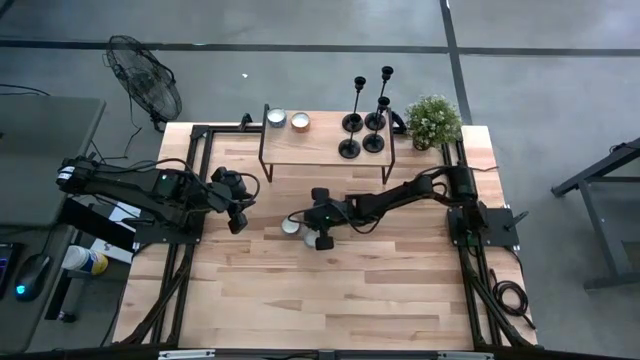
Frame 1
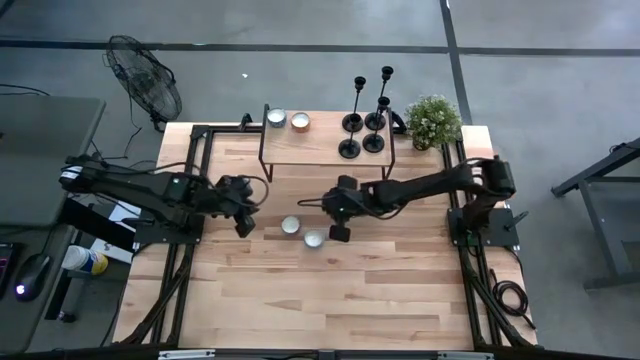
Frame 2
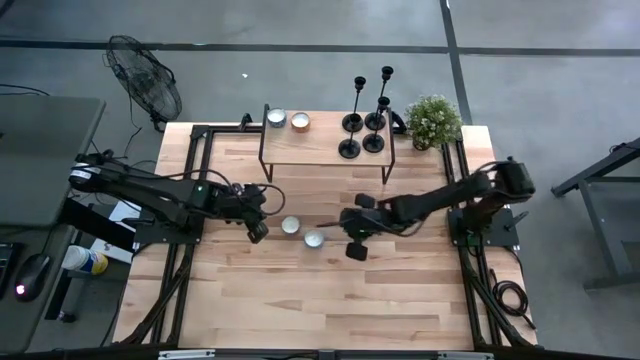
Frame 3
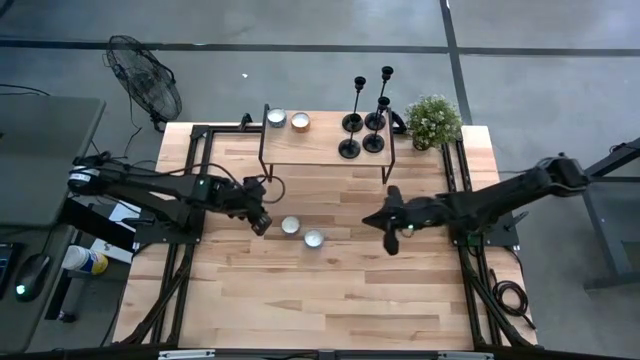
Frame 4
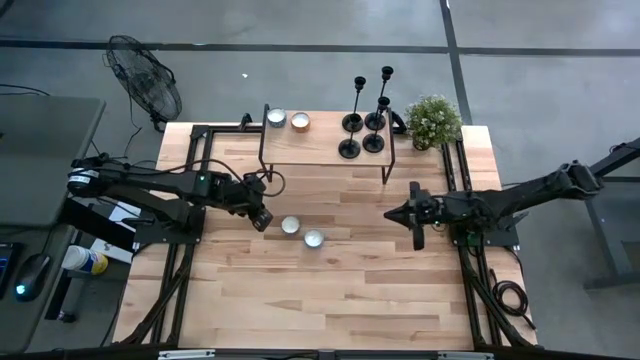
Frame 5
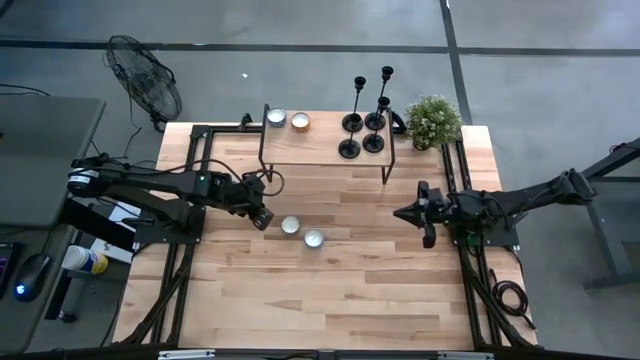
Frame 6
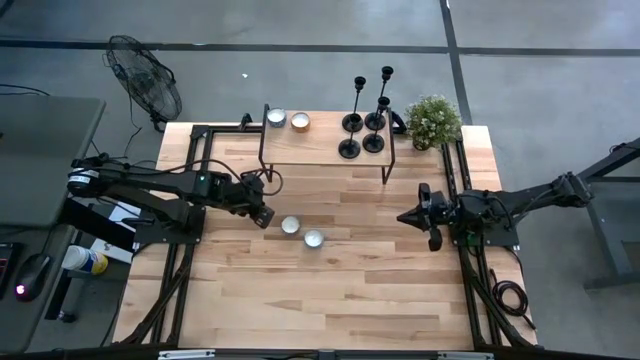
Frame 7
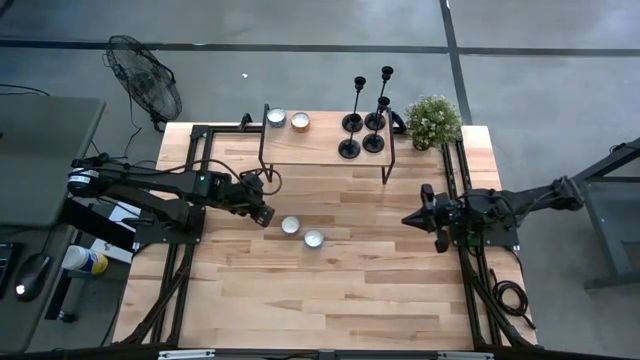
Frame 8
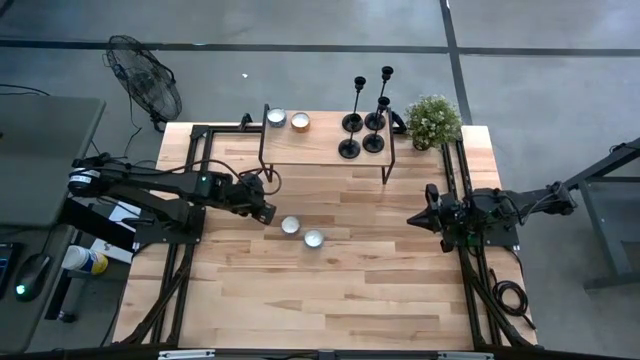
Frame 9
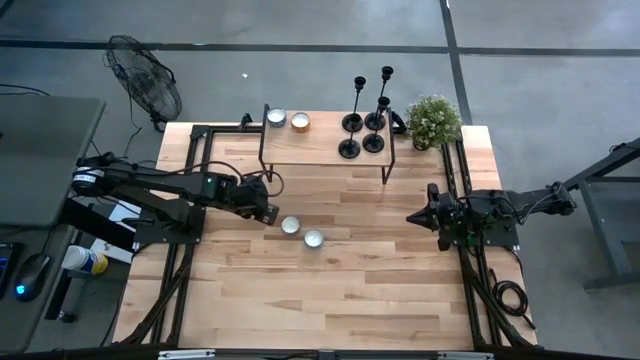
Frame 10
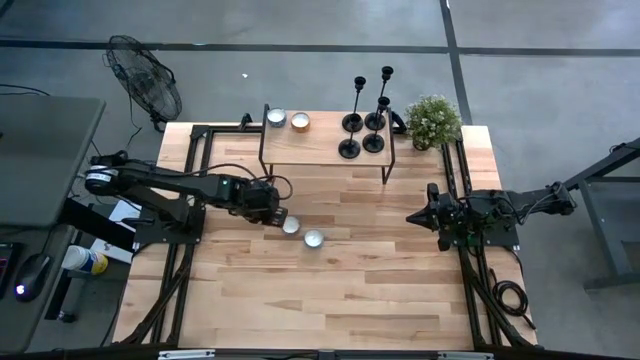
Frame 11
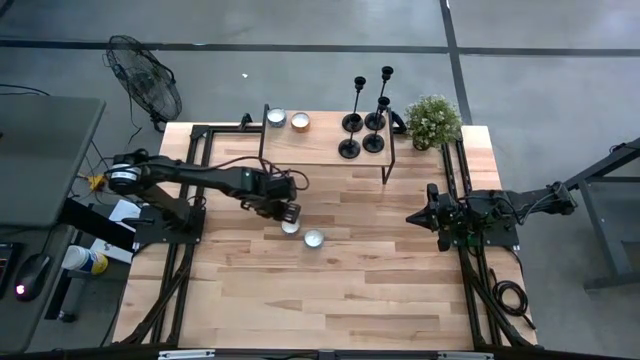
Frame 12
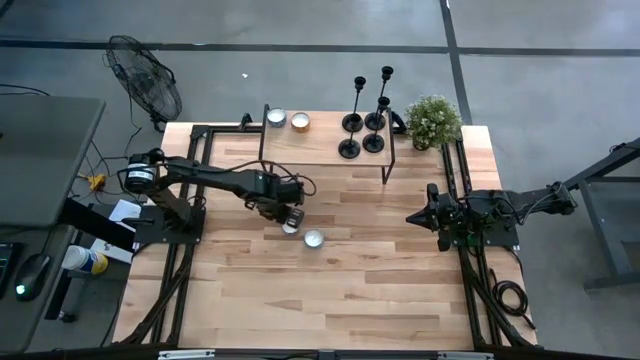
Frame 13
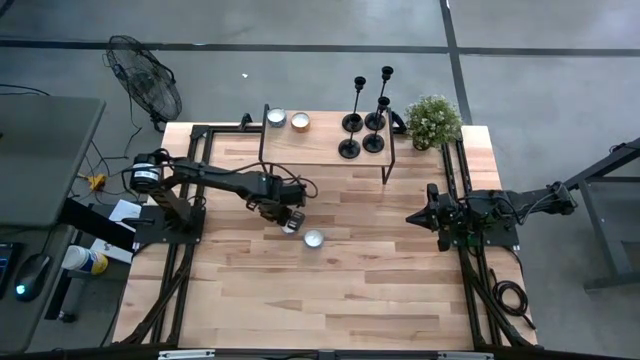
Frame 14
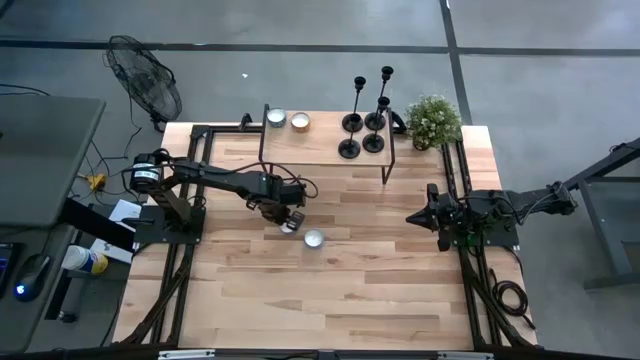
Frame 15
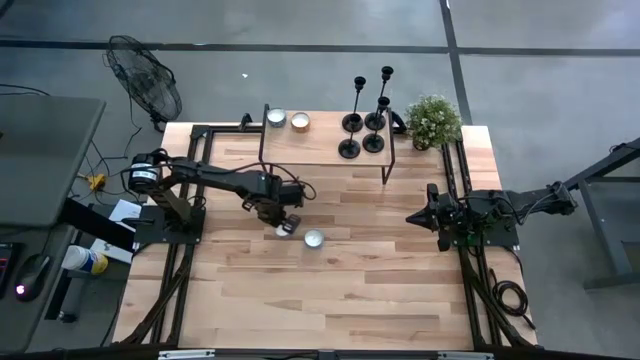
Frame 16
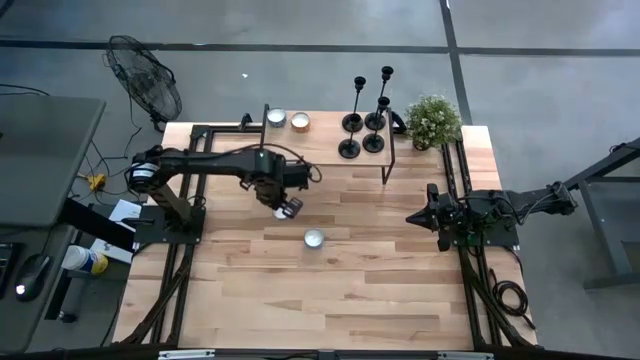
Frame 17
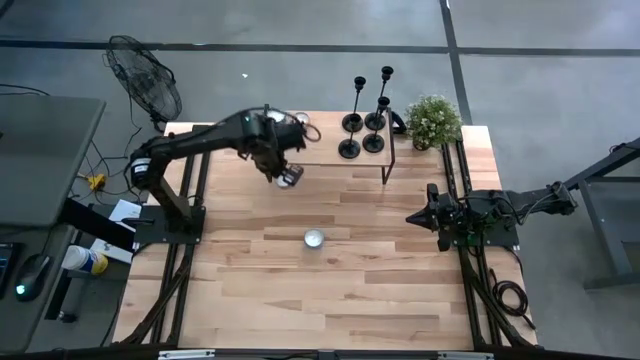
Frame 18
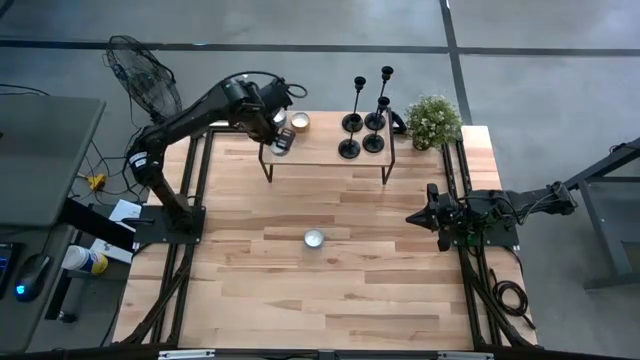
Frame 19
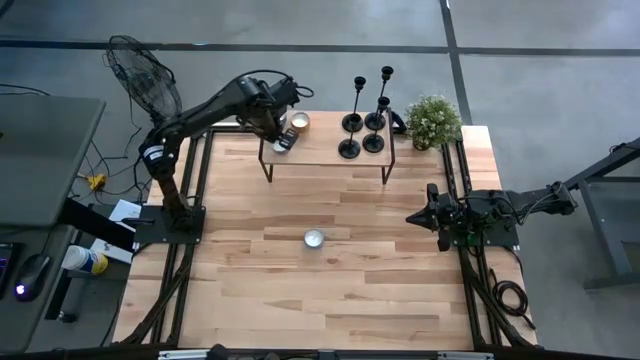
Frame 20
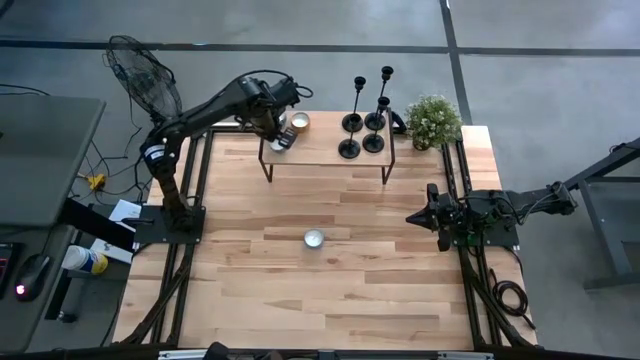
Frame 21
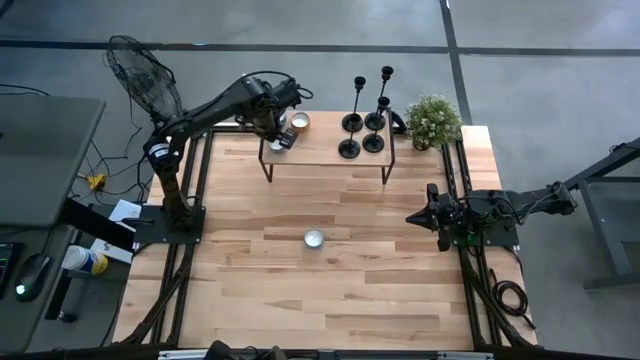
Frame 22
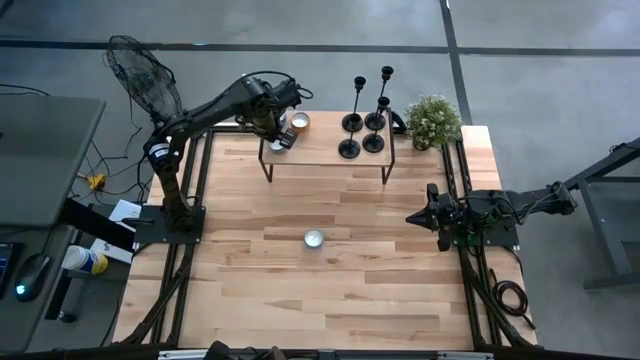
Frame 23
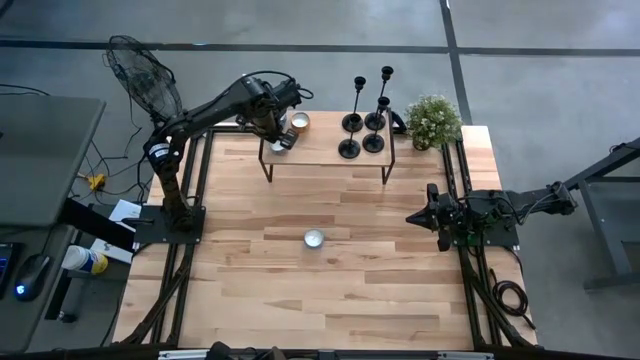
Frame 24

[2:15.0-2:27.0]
Task: Pick & Place candle stick holders
Put the brown scented candle on the shelf

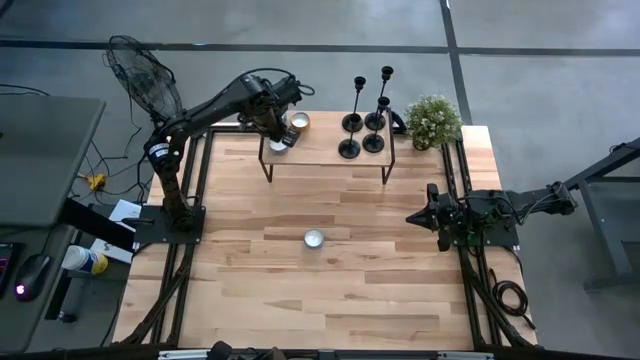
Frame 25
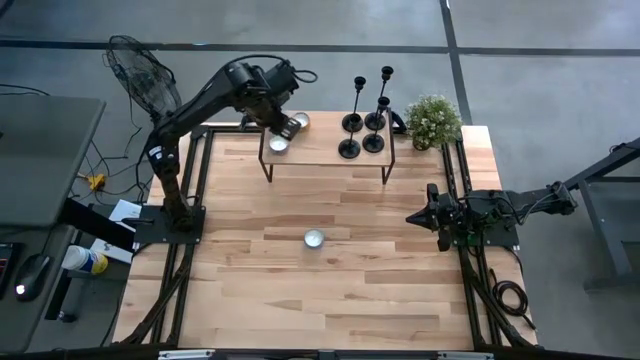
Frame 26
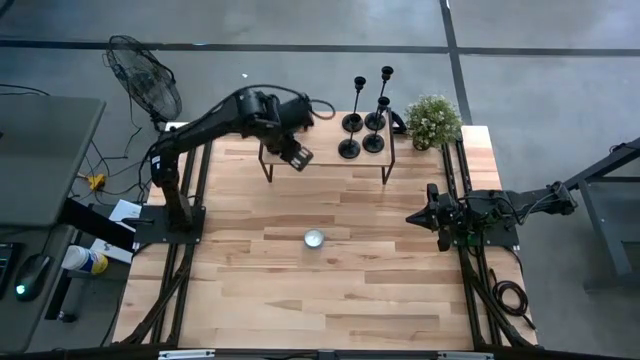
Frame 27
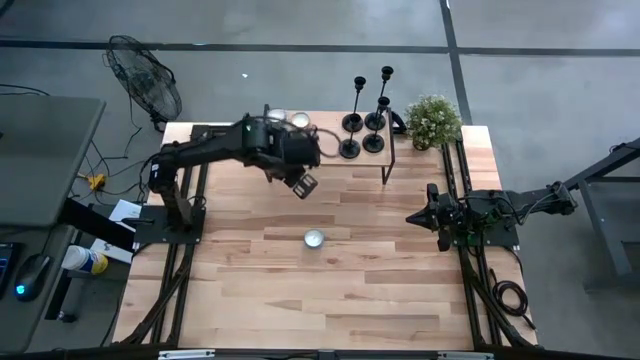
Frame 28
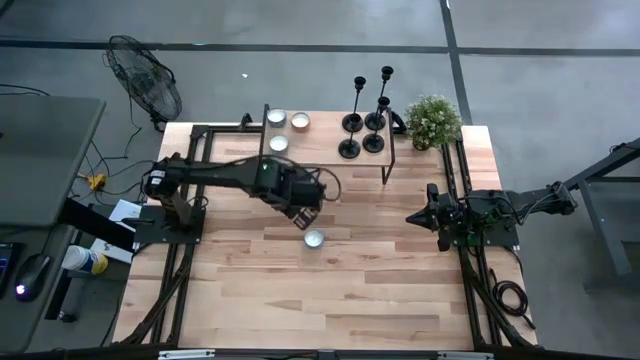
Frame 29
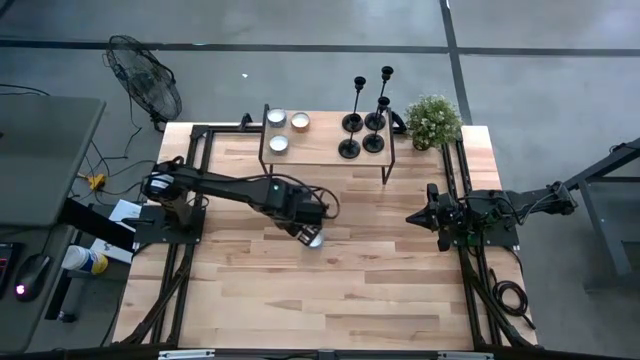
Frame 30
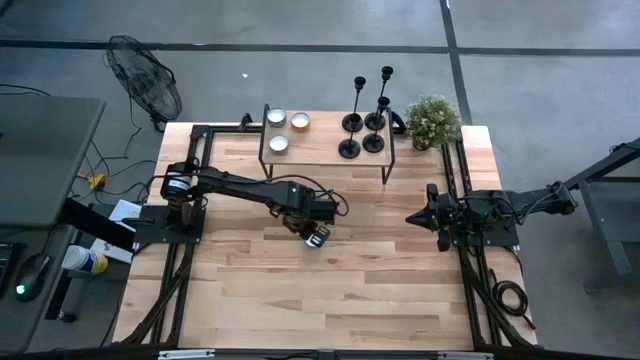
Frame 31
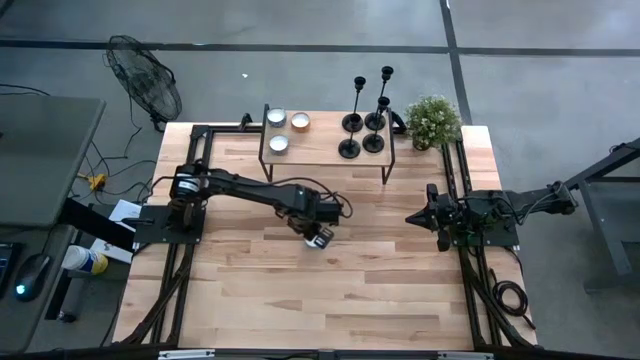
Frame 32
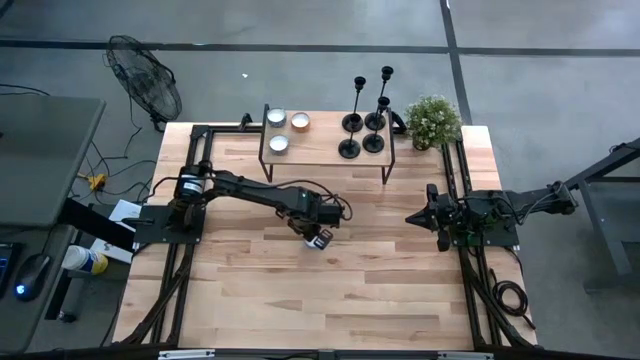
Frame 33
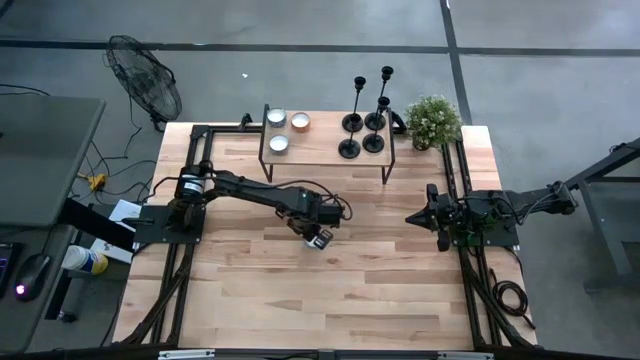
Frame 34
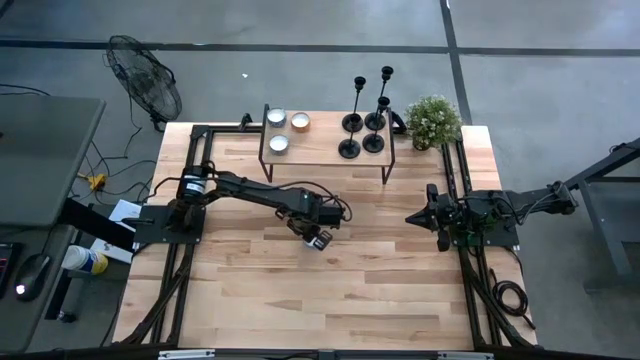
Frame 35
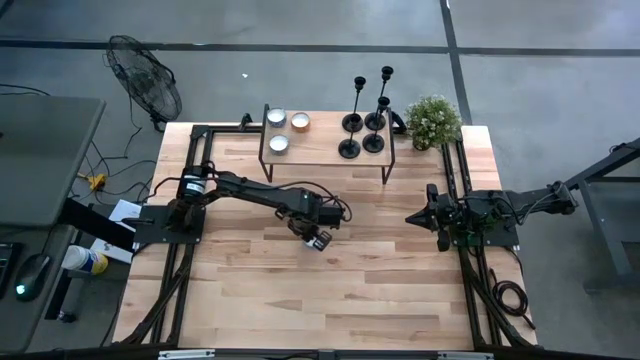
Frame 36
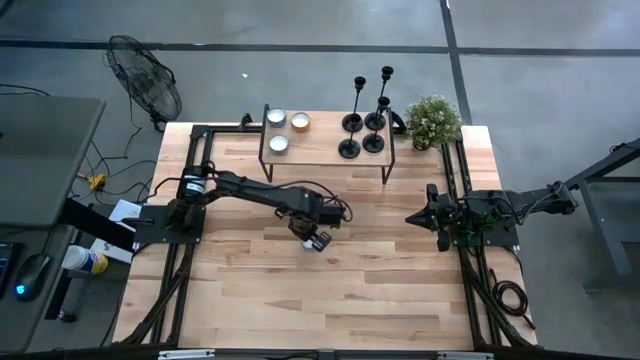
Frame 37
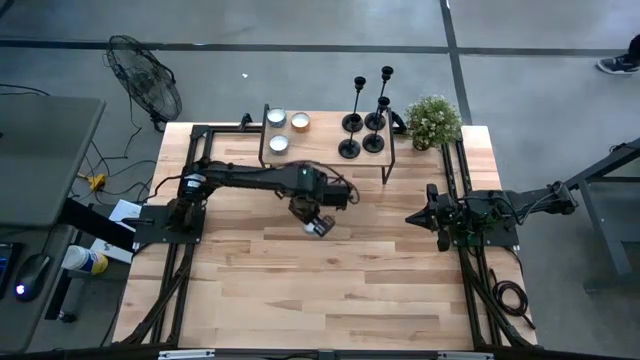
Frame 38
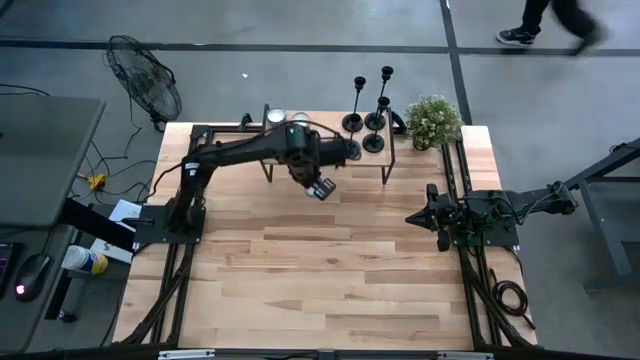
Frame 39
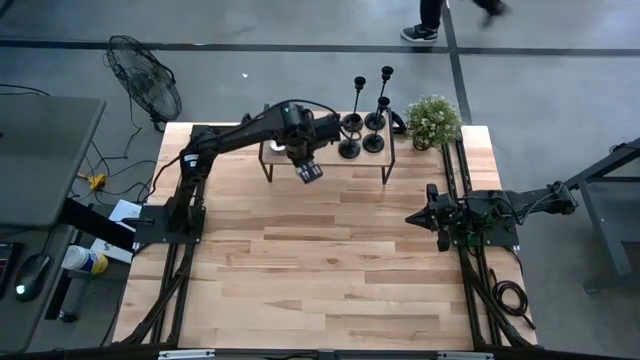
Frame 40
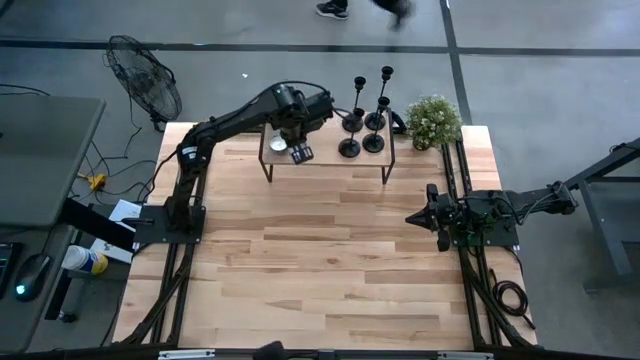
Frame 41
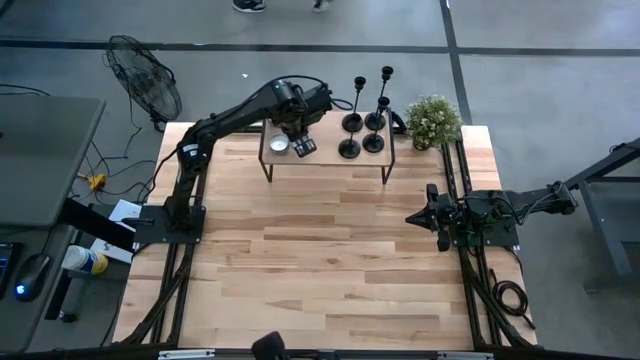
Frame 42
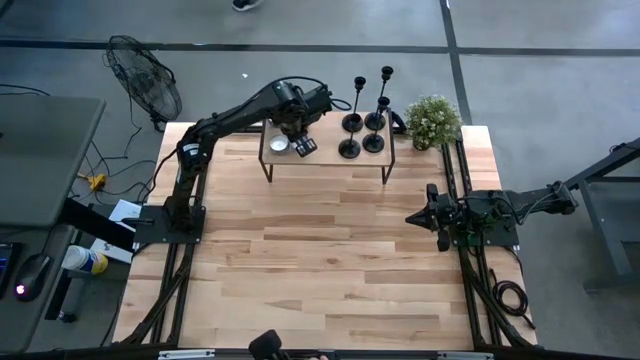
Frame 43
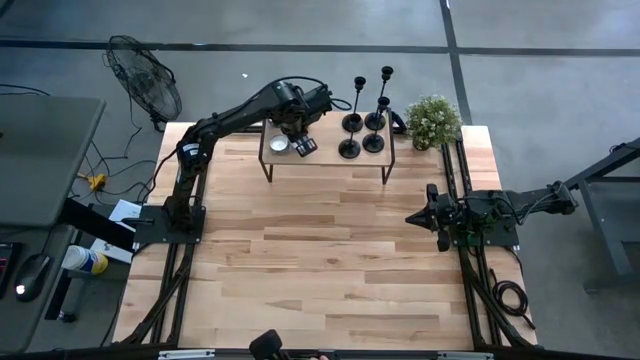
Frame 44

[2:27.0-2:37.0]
Put the light blue scented candle on the shelf
